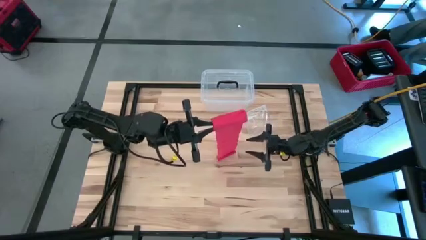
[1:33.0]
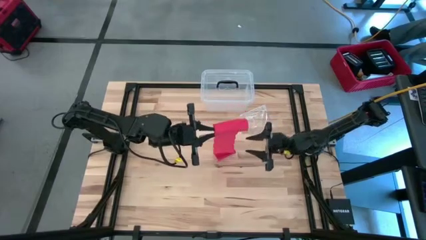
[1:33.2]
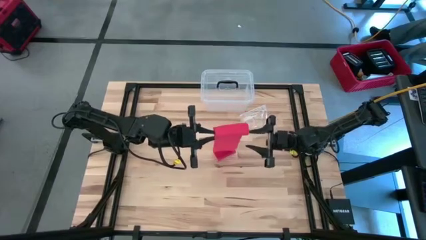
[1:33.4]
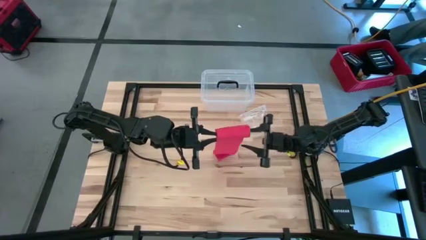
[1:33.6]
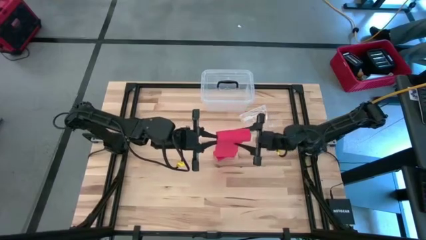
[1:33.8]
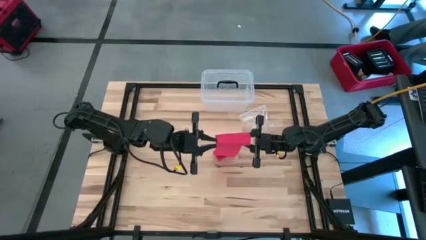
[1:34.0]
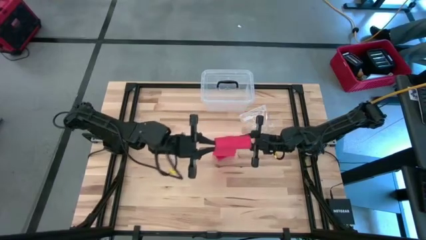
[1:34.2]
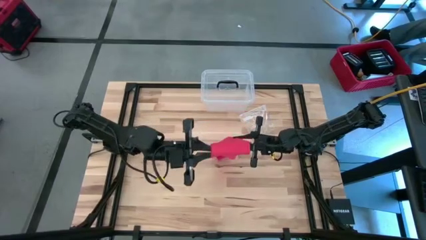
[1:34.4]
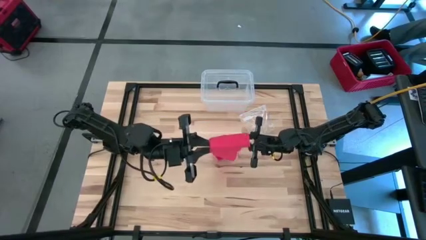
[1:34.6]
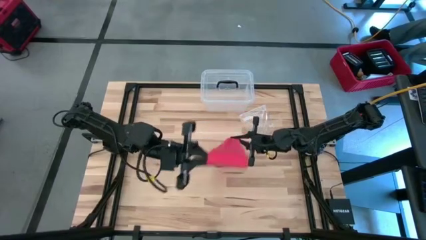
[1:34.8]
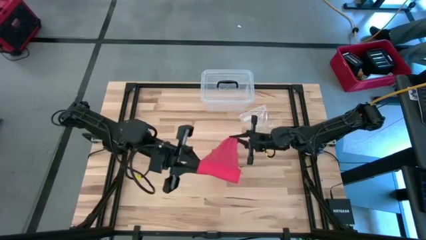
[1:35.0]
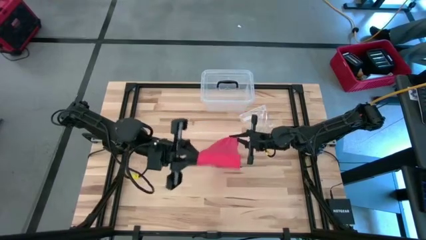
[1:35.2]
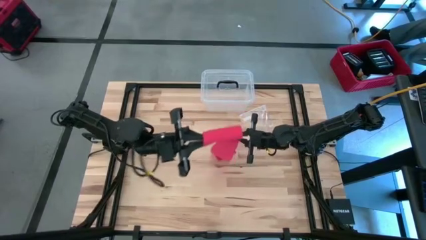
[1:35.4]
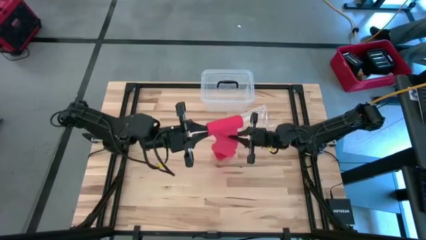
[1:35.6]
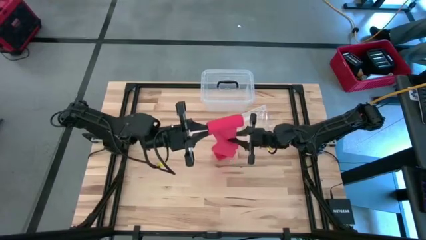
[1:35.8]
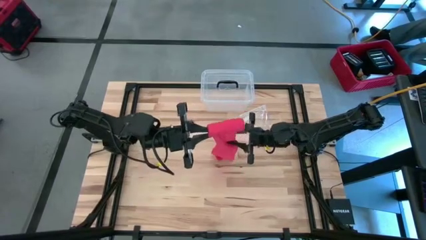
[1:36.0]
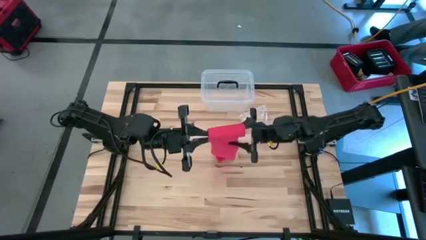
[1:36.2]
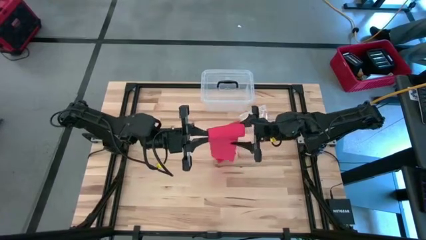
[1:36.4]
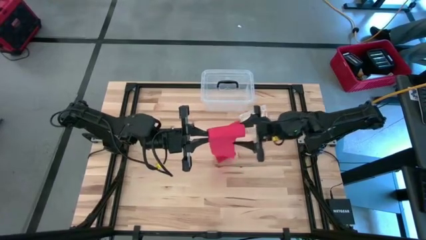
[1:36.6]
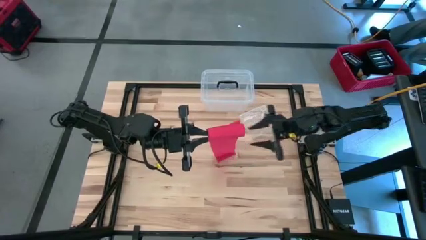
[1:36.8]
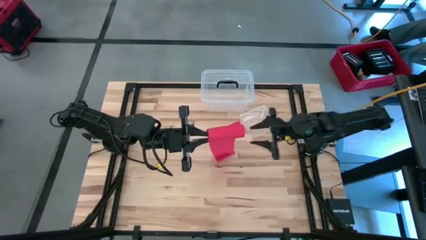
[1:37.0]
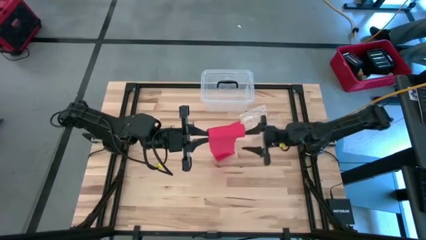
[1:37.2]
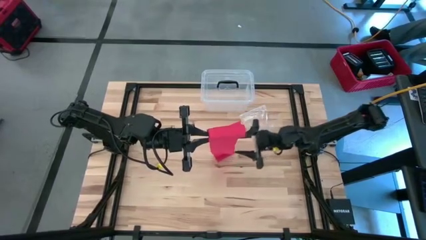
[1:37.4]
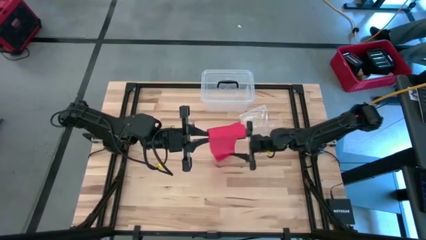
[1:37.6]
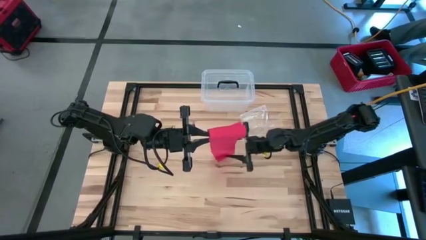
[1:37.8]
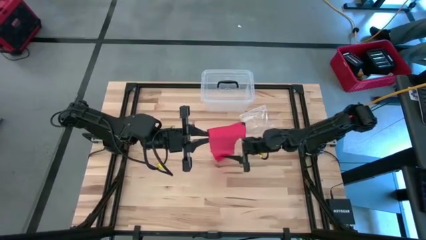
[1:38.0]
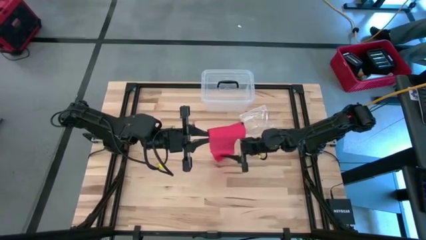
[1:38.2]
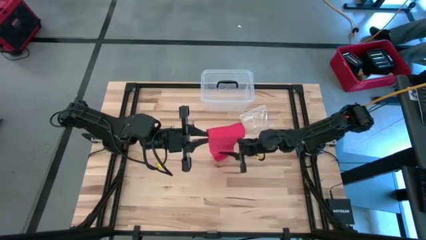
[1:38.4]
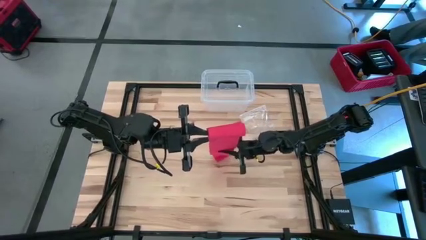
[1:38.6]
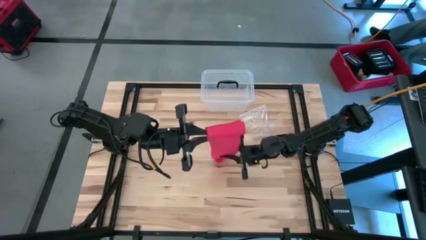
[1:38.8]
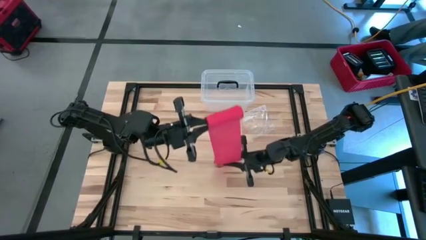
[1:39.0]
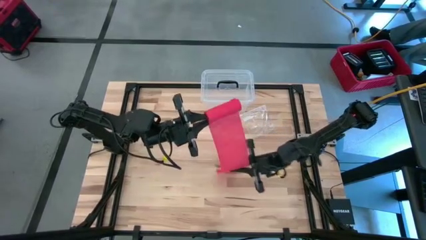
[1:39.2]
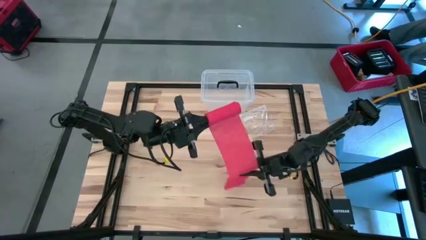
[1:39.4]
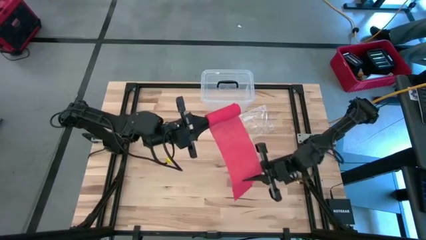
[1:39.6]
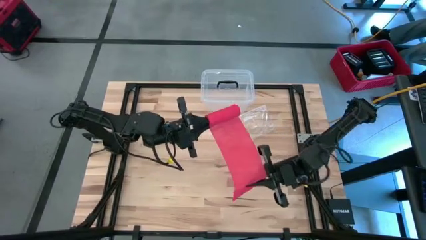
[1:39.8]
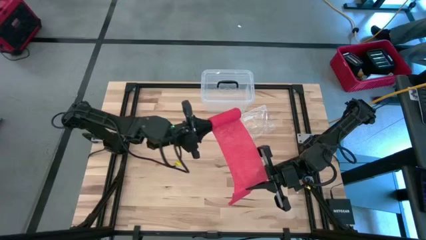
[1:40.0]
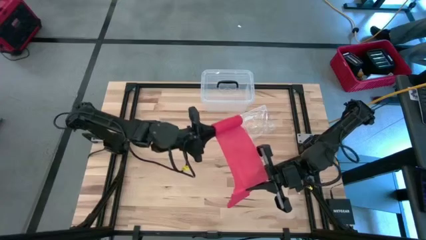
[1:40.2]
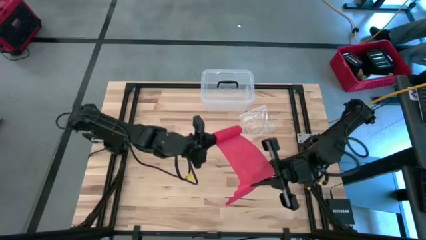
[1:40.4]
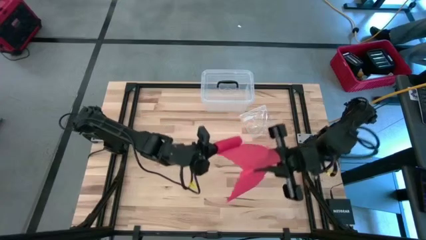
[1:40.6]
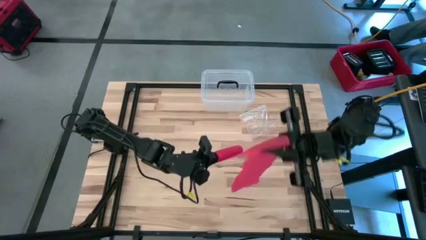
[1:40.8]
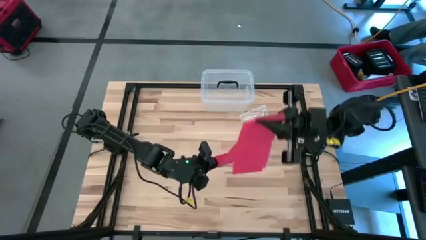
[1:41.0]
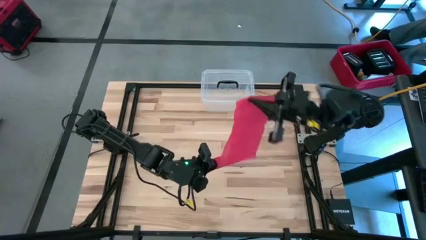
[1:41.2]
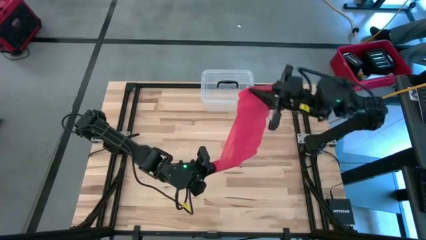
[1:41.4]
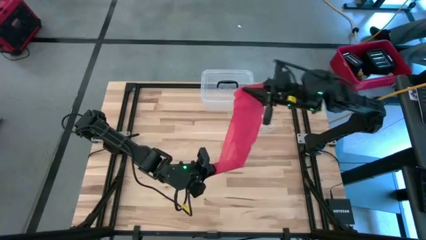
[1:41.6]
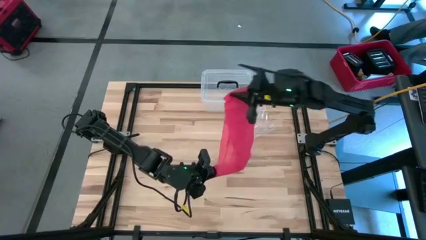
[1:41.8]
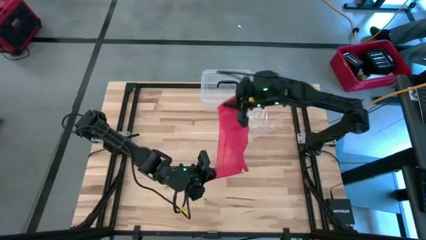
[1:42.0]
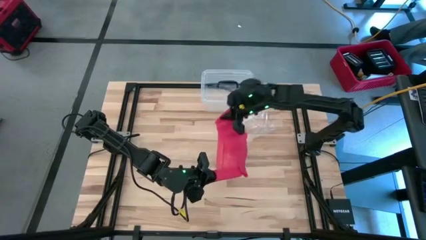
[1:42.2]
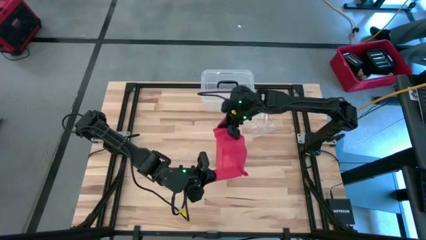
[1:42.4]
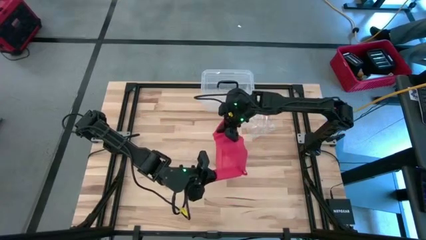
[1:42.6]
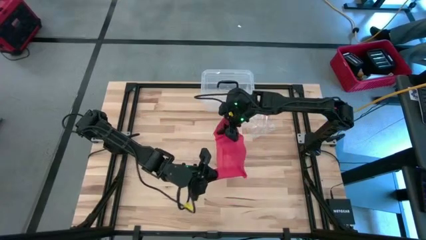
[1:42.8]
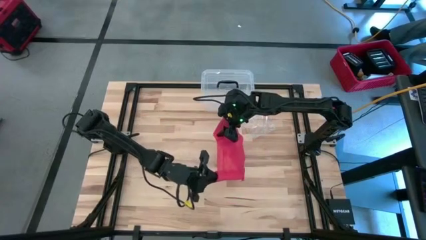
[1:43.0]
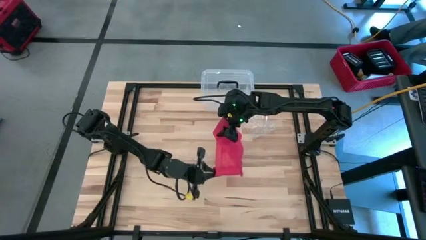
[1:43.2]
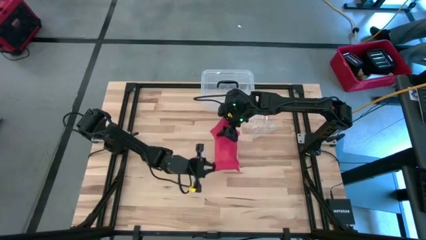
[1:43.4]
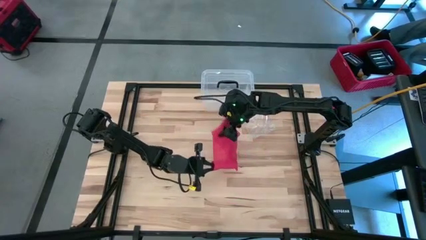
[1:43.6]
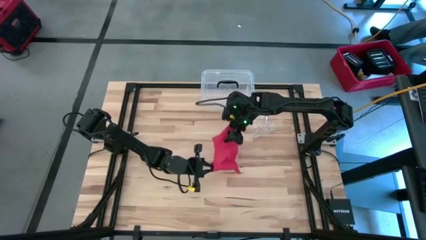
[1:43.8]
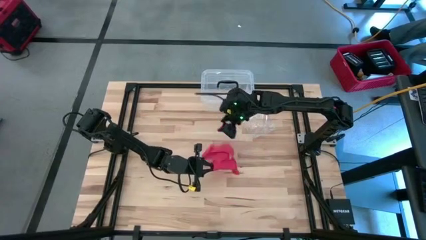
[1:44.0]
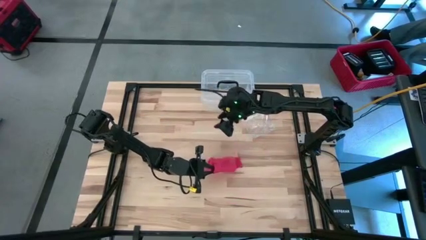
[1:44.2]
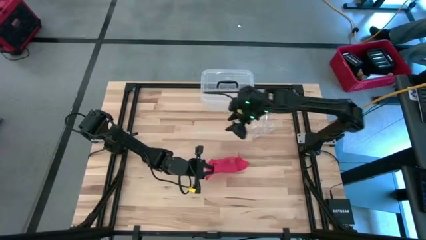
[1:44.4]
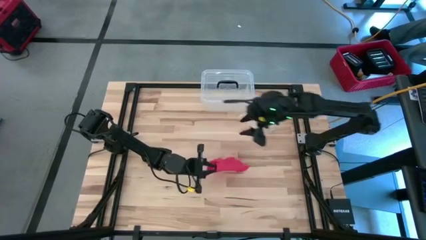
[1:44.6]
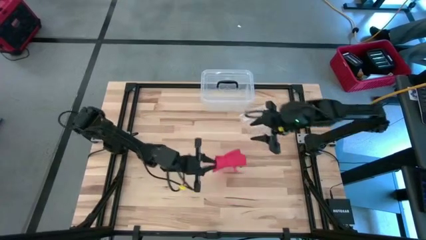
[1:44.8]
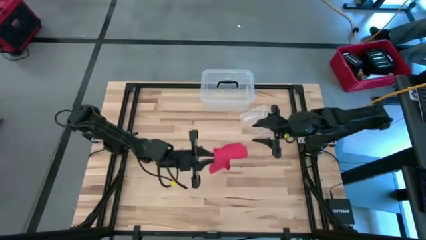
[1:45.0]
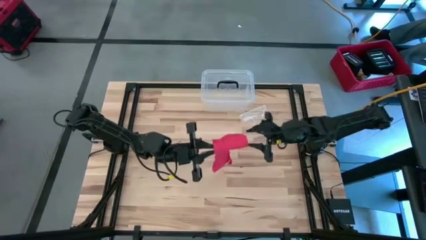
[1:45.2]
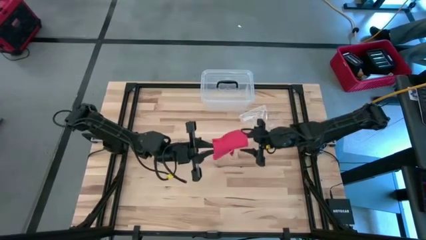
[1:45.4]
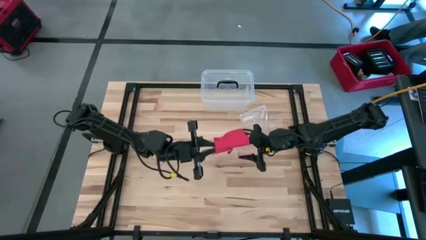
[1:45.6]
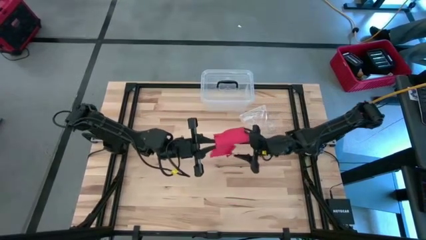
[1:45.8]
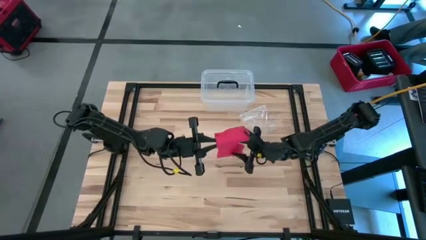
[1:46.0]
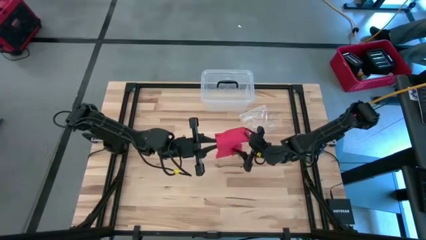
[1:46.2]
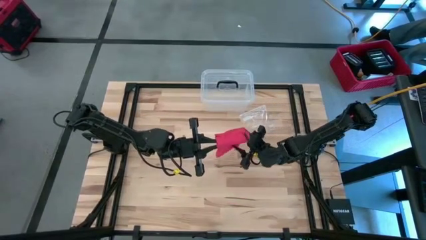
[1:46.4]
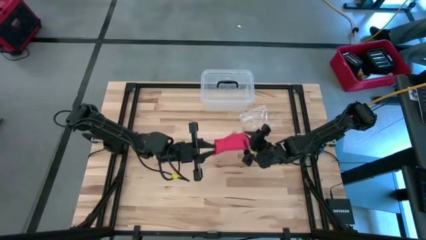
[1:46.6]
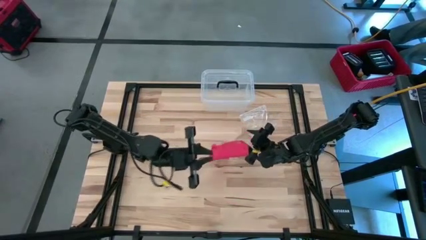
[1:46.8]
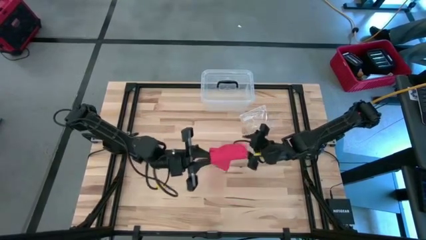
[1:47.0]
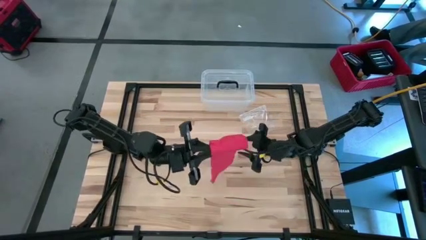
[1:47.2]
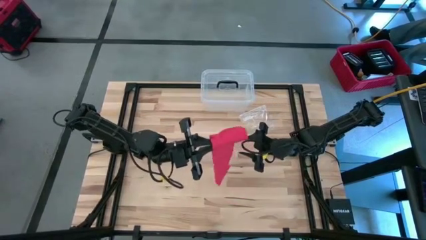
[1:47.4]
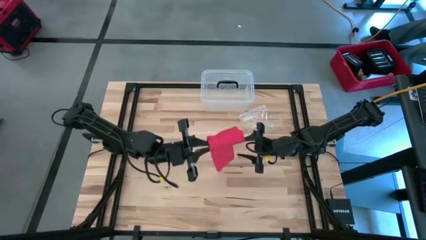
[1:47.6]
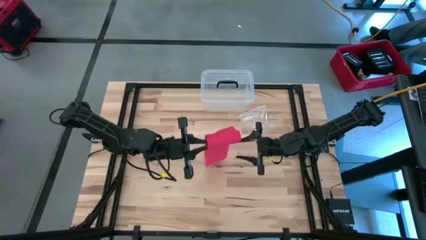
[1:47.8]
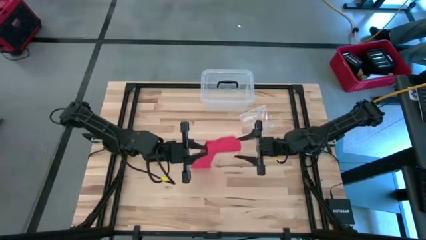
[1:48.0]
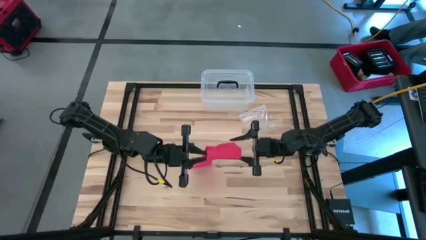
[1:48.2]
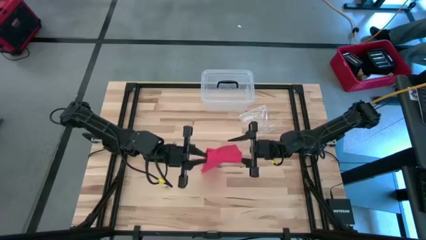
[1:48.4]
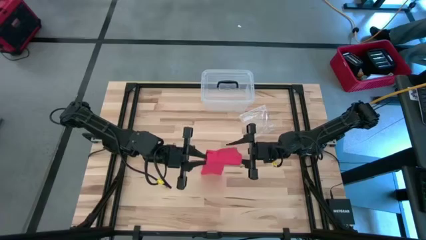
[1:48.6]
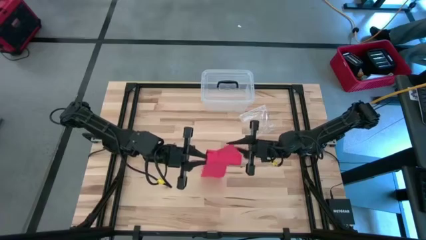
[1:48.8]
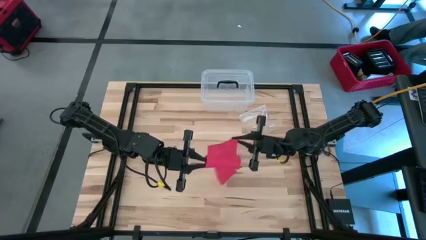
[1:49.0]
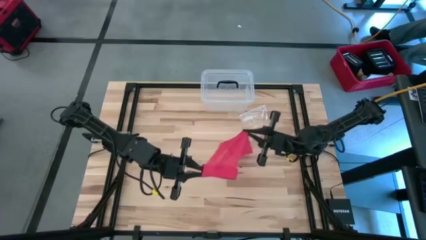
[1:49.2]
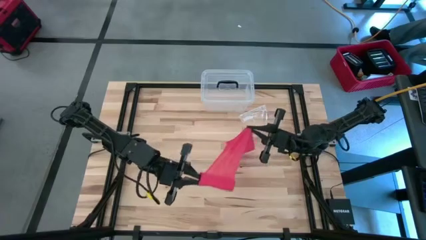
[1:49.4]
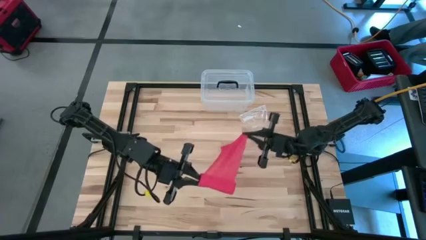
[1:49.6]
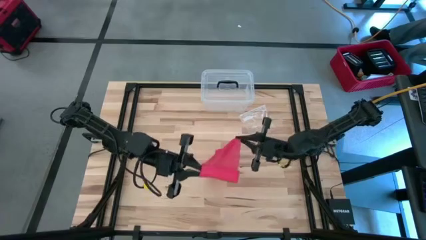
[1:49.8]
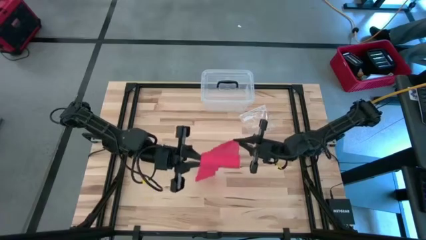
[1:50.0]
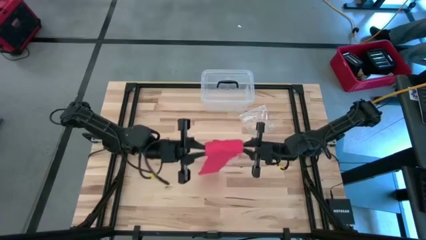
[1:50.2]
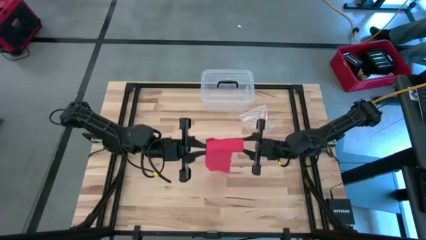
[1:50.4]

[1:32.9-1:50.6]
Task: Roll bandage
Roll the red bandage
